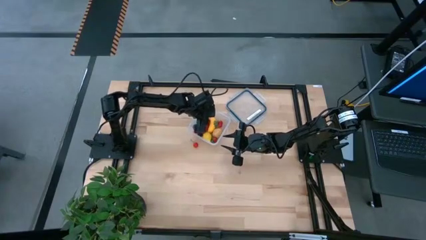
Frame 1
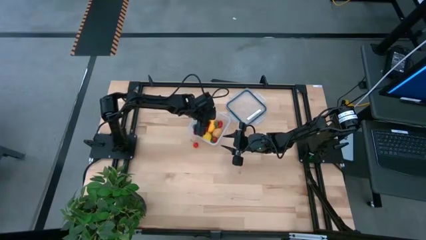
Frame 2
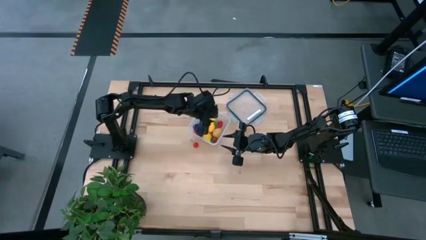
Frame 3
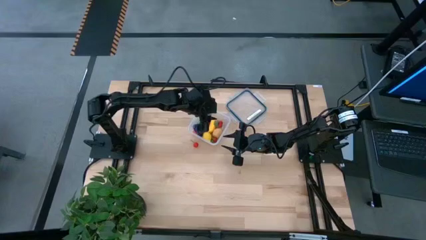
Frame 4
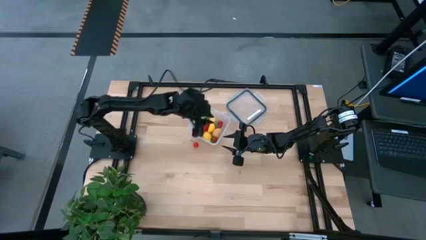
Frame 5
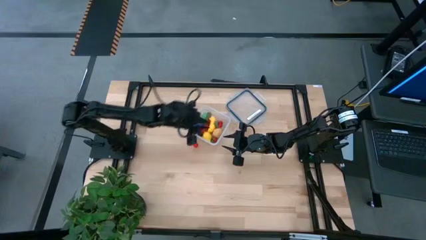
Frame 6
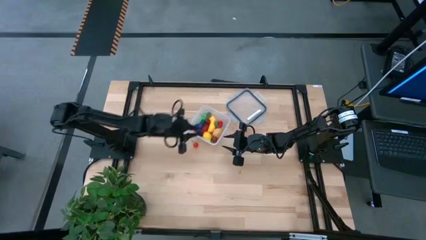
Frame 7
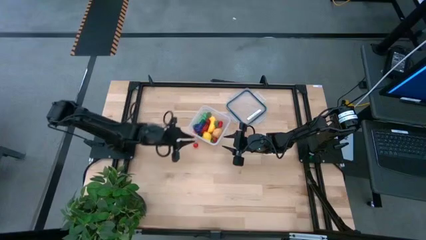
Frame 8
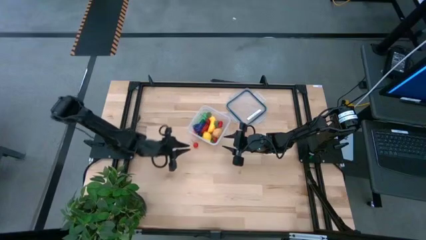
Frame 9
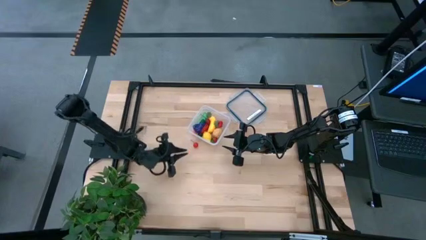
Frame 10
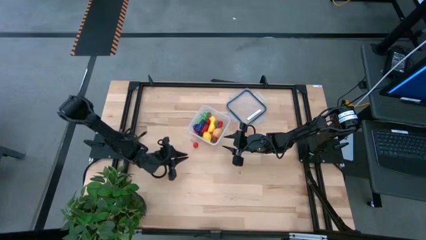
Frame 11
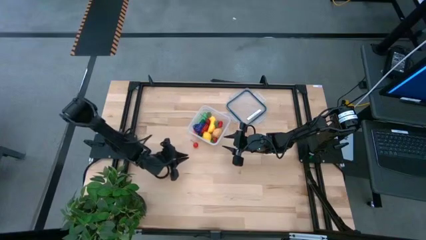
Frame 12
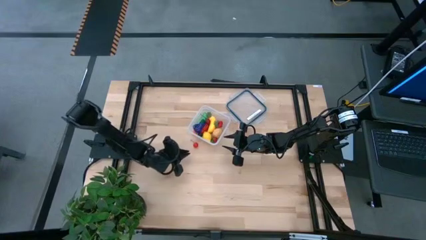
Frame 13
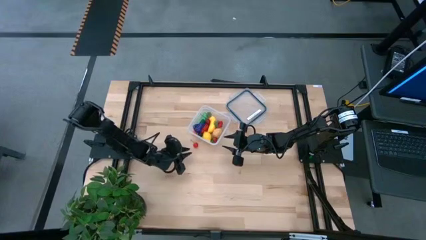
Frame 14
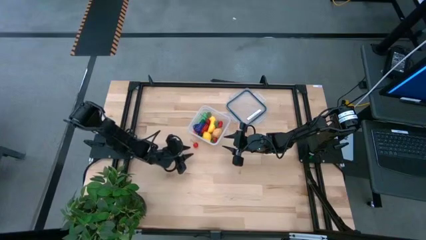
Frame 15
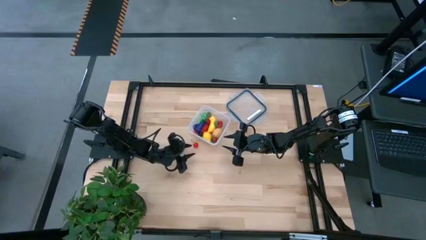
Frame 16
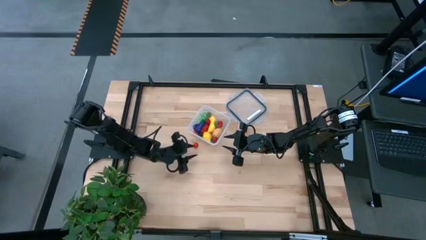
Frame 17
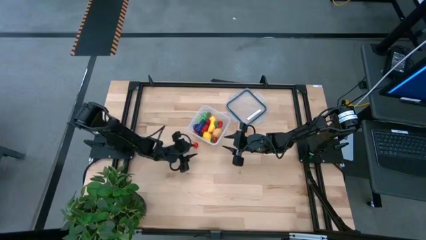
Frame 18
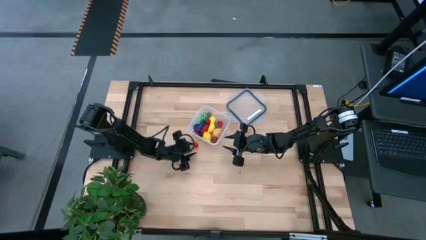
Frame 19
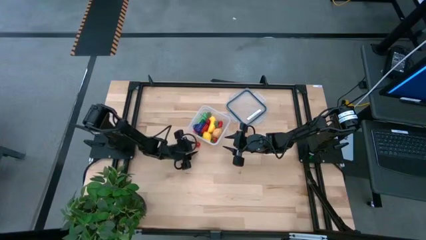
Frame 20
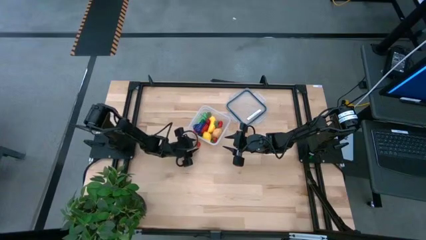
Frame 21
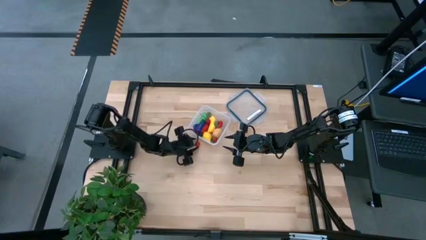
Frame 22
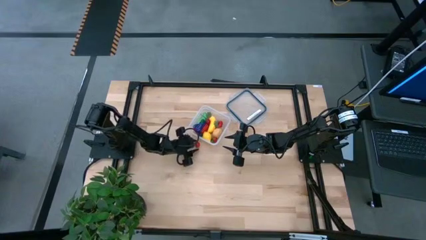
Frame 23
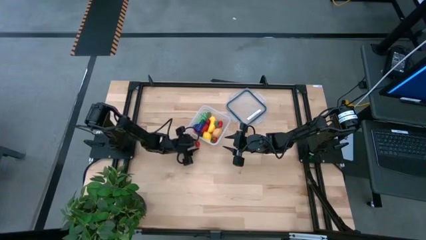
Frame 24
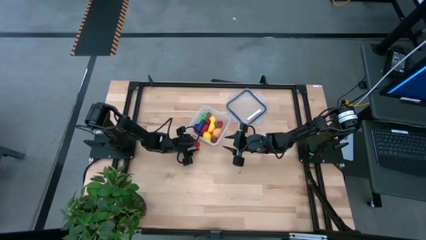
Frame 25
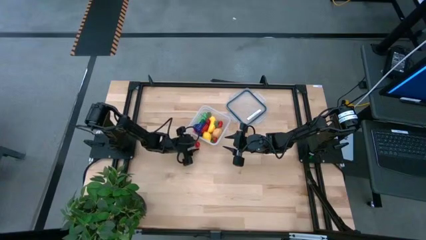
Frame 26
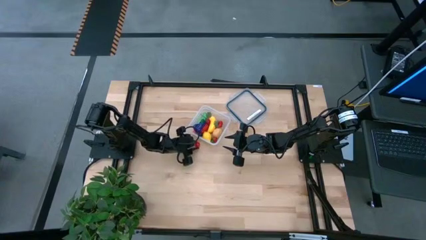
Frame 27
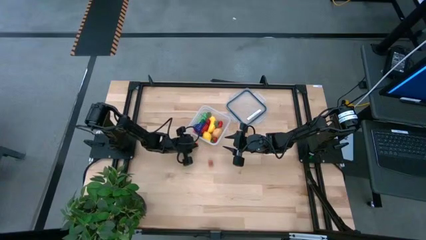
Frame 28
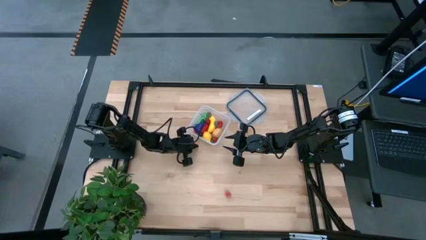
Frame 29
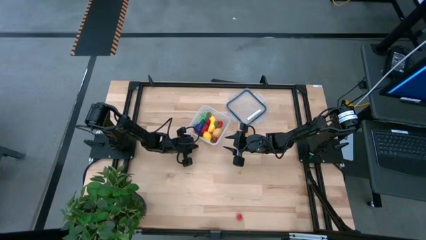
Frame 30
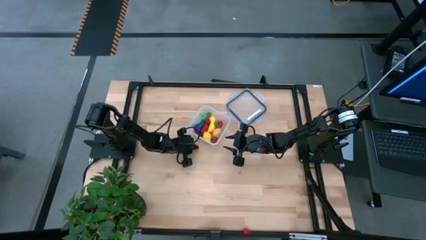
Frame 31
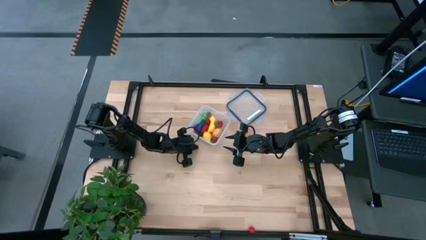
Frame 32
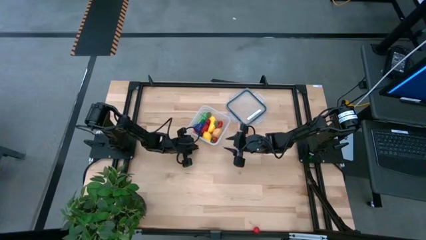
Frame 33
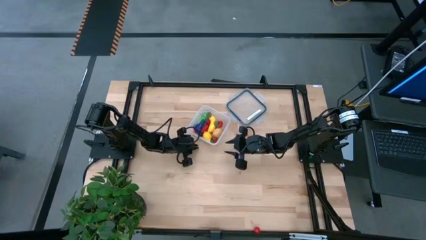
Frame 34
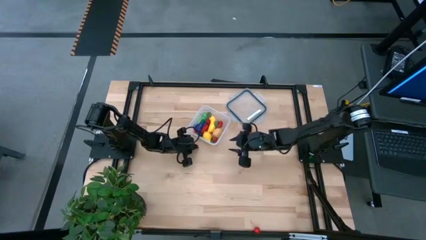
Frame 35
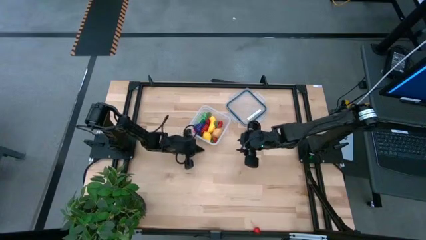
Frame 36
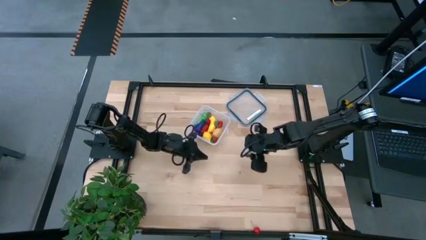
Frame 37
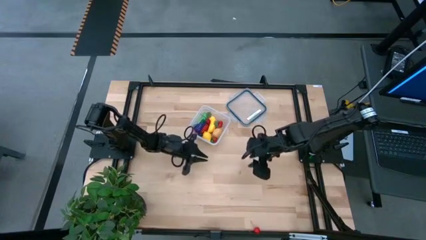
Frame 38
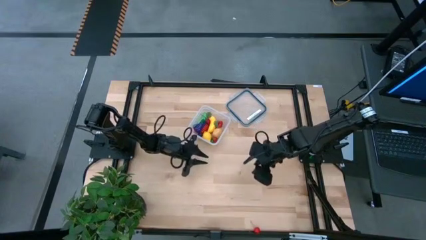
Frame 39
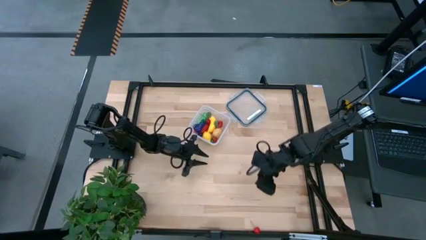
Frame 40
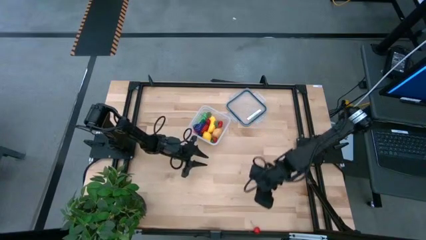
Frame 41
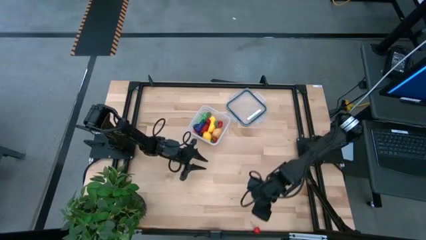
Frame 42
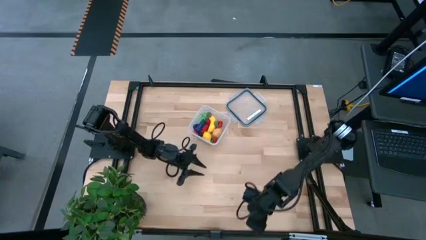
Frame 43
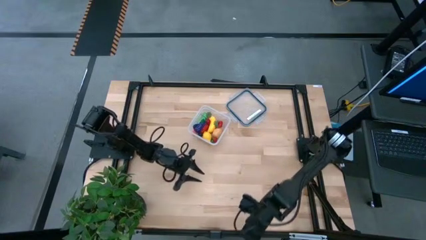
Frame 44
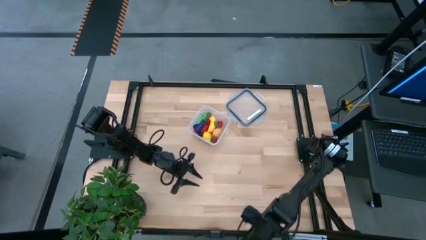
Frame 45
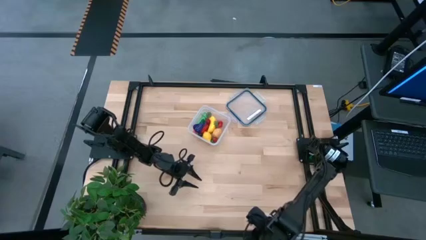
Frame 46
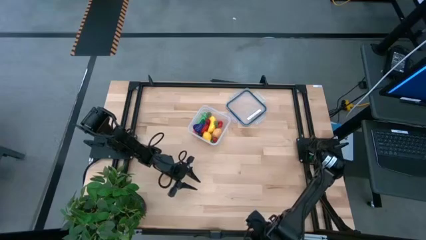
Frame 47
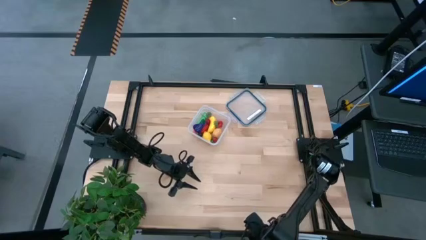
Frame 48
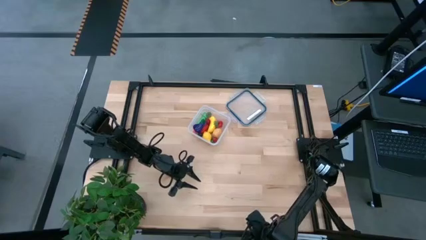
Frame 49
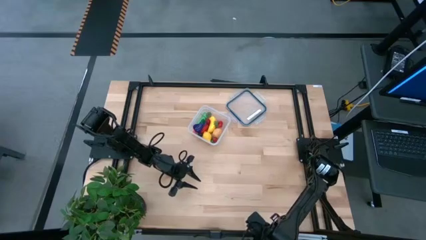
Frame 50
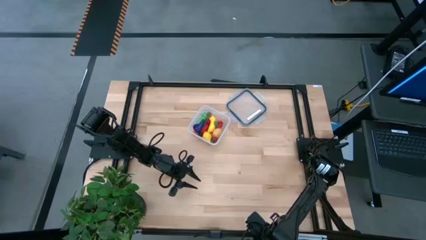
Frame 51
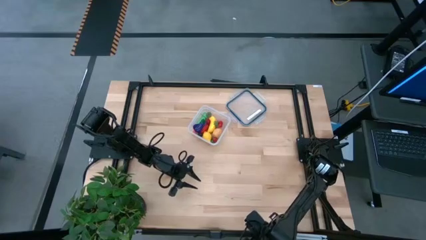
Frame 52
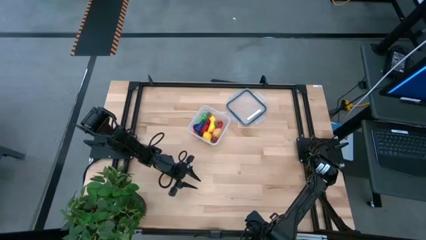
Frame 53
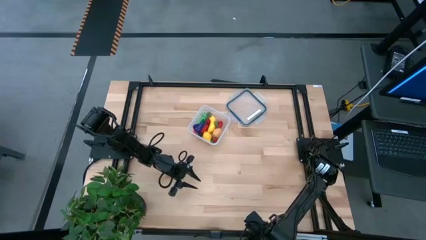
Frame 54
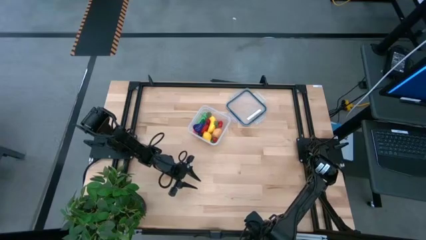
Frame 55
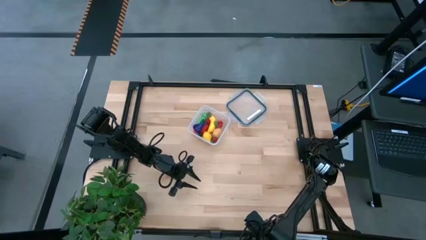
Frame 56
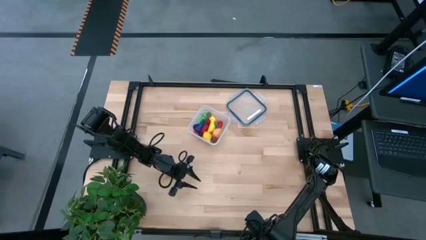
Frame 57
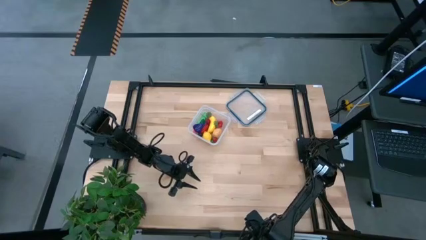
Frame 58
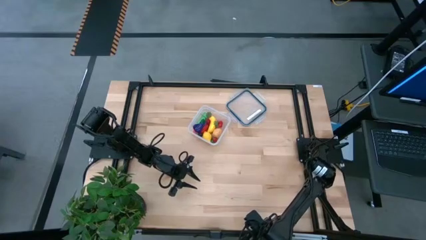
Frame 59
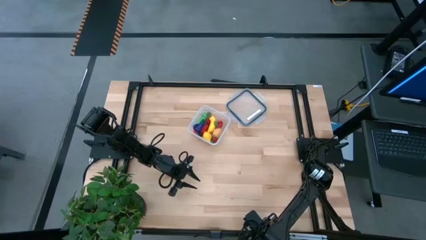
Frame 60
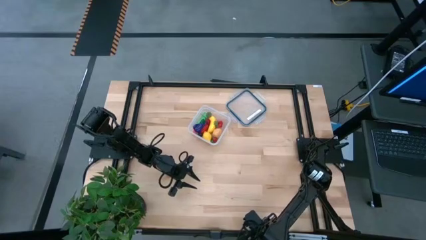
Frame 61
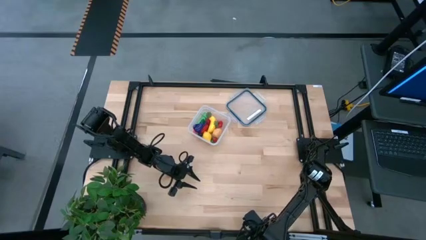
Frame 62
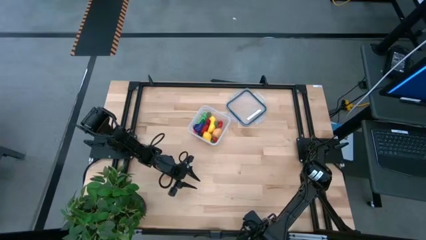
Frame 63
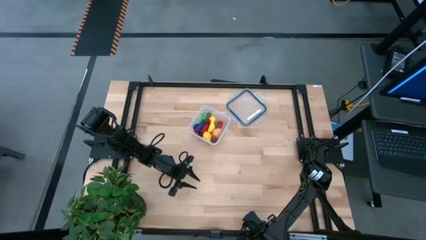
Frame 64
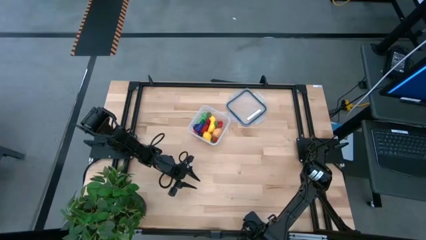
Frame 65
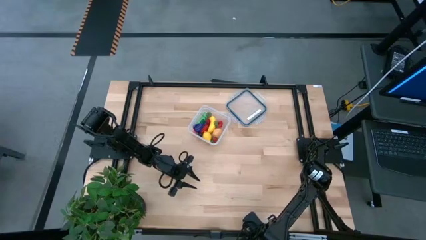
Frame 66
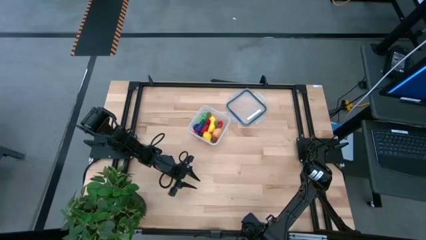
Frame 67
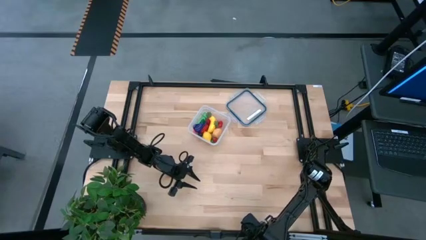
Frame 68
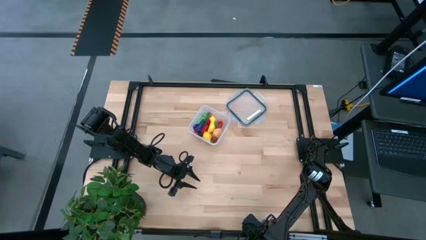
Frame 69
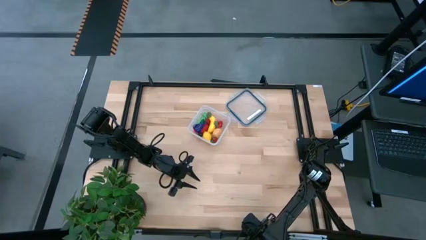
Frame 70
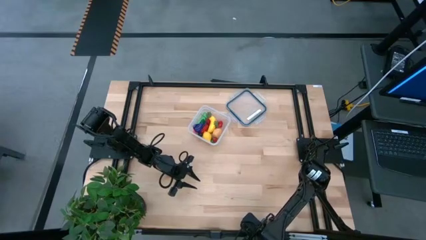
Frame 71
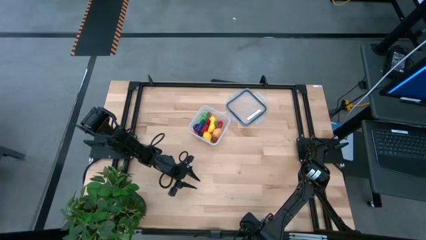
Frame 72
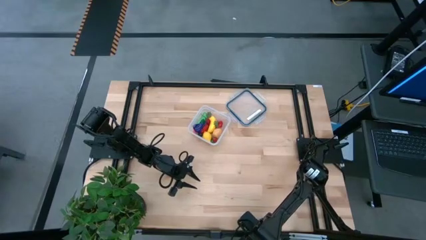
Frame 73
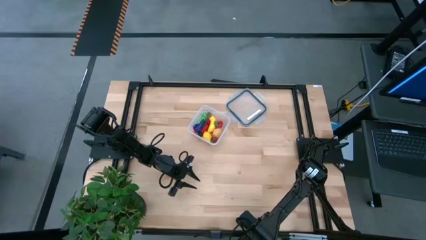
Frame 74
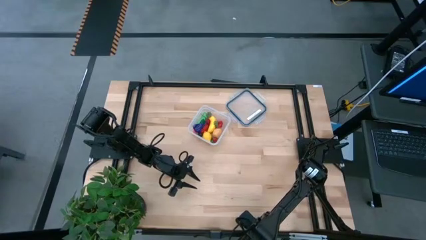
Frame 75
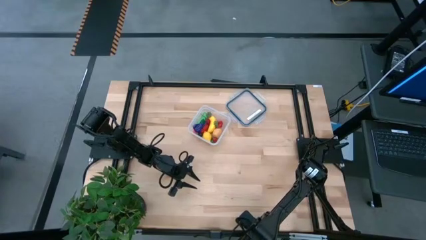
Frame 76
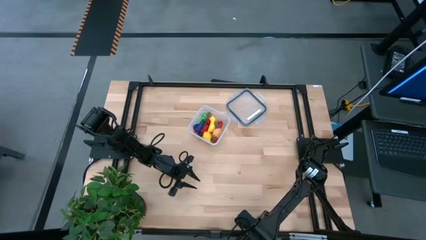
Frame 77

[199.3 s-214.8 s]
Task: Pick and placing Produce into tupperware
Put the red cherry into the transparent container

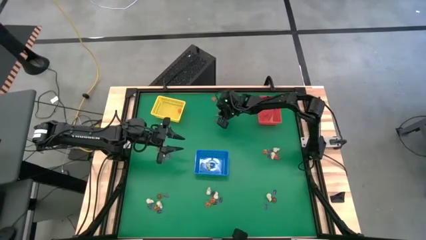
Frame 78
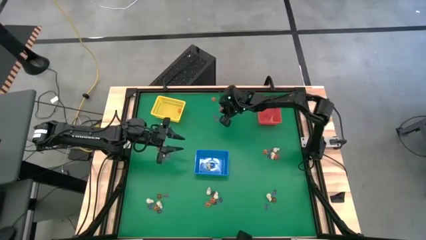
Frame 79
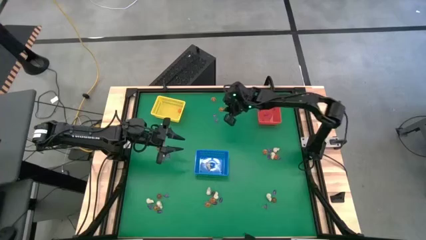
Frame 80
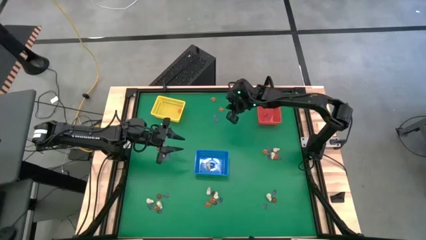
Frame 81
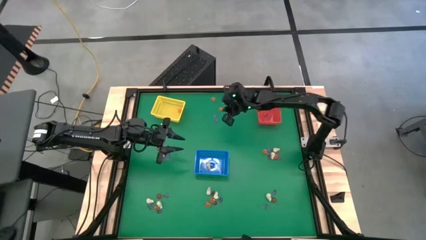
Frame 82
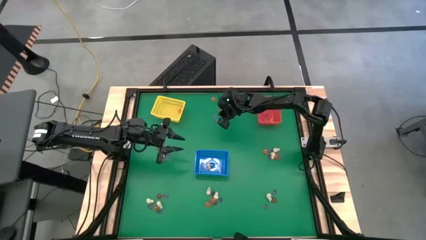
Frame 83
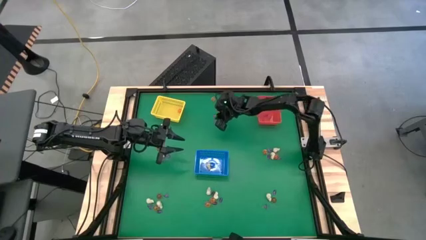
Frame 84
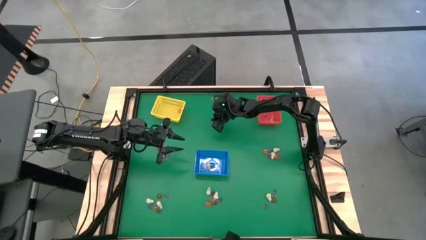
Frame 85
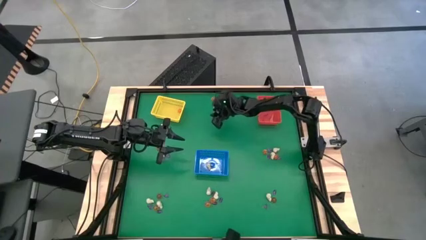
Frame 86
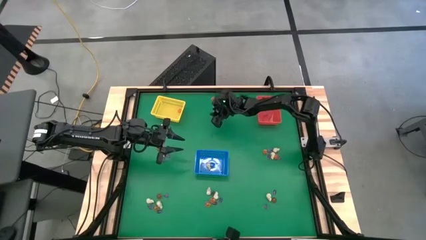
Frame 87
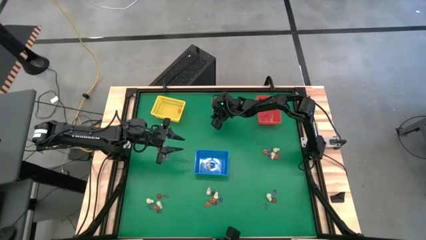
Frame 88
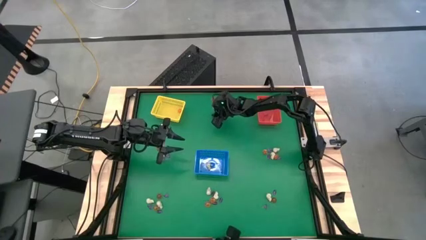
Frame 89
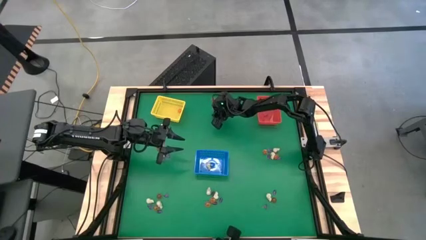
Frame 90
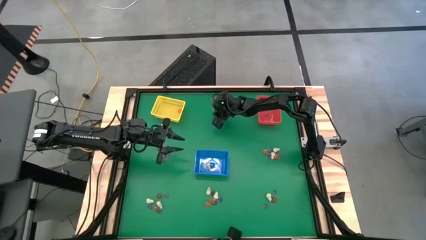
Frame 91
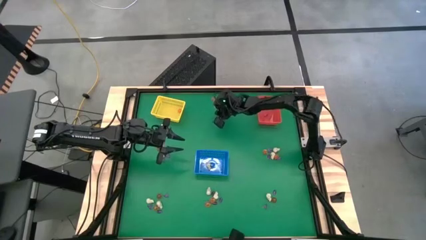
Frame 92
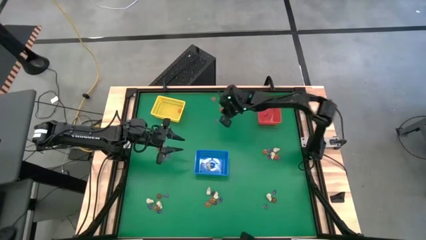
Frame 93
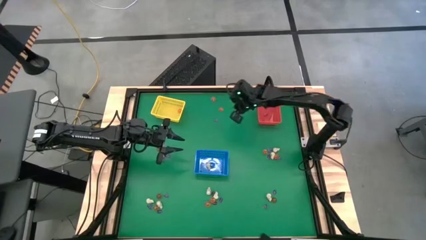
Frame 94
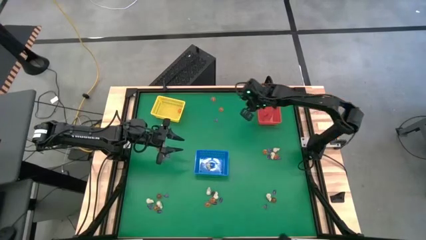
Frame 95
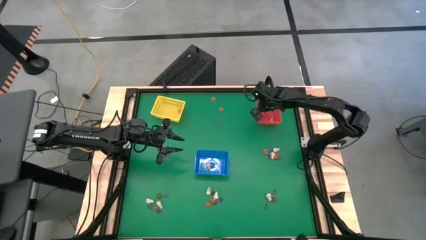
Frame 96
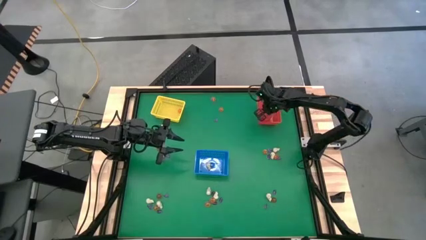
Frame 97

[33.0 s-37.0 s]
Task: Sort Halloween decoration
Put the purple witch hat toy into the red bin
